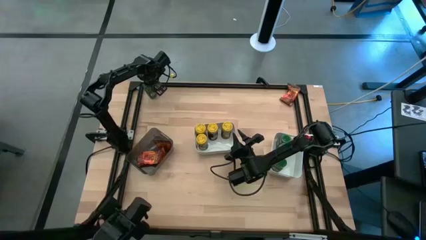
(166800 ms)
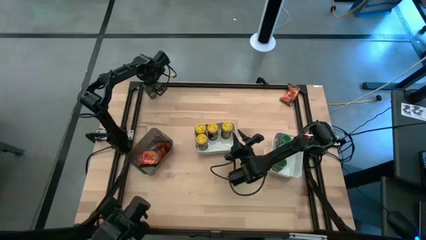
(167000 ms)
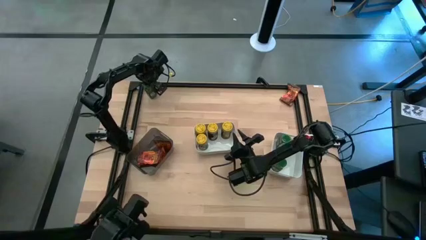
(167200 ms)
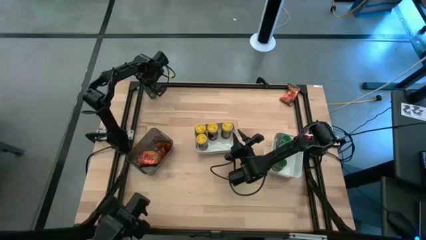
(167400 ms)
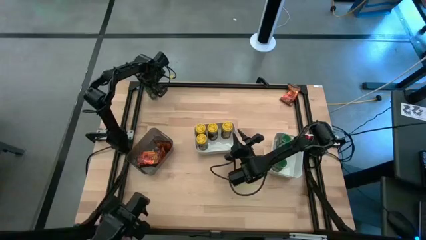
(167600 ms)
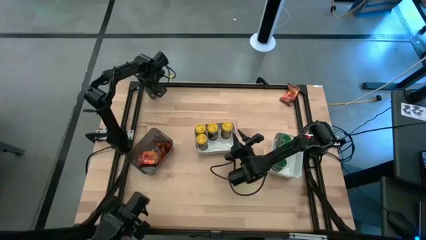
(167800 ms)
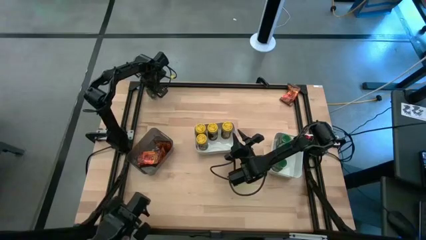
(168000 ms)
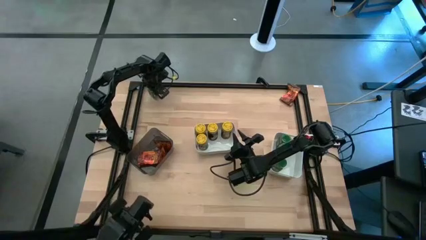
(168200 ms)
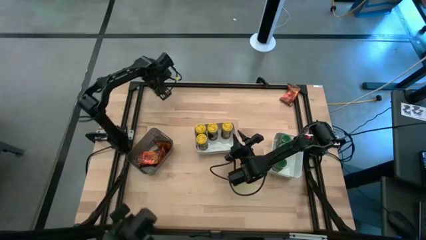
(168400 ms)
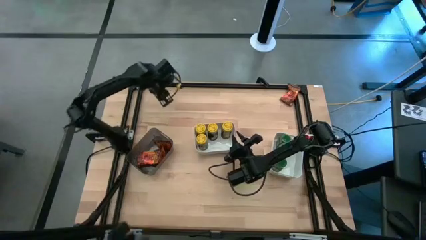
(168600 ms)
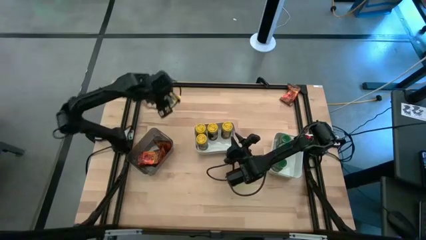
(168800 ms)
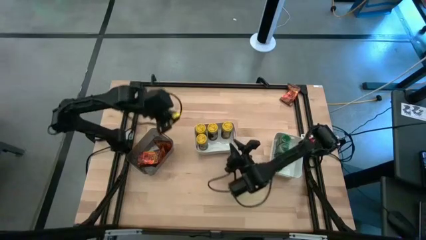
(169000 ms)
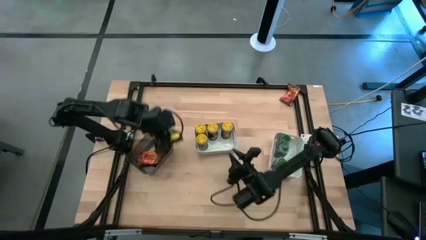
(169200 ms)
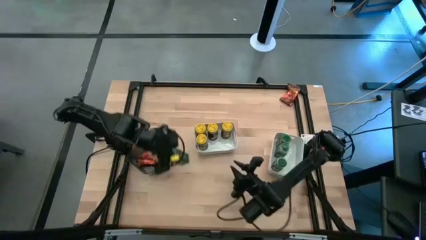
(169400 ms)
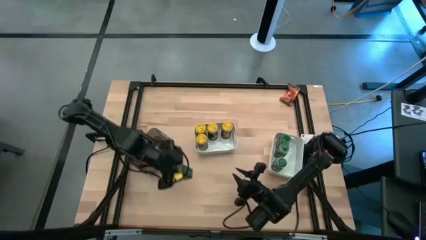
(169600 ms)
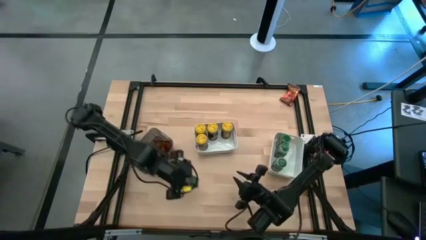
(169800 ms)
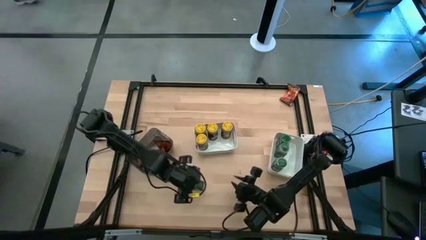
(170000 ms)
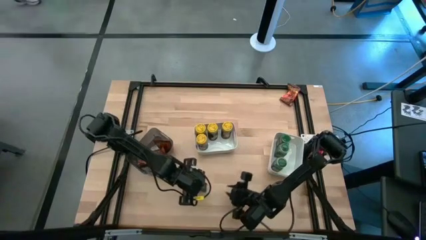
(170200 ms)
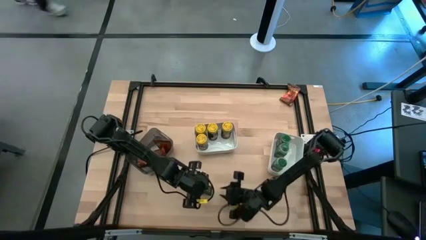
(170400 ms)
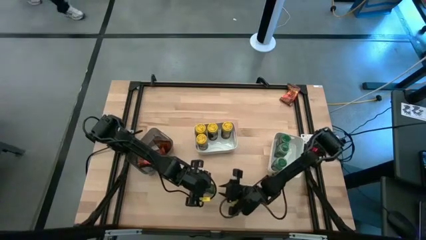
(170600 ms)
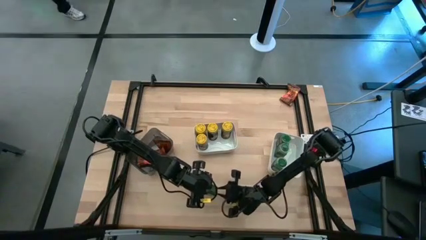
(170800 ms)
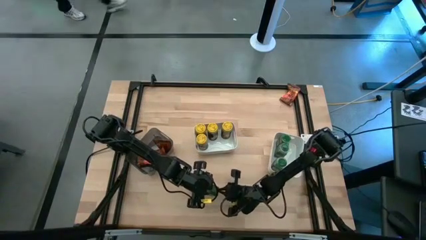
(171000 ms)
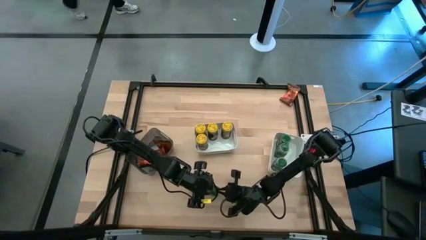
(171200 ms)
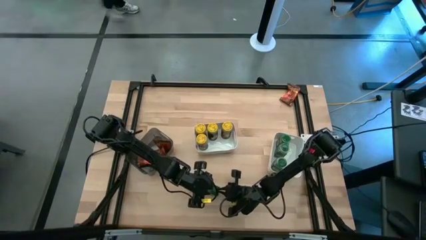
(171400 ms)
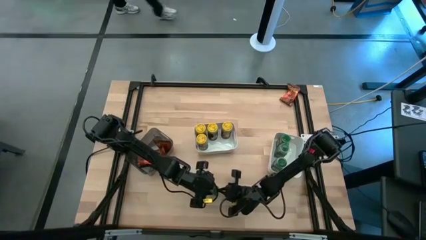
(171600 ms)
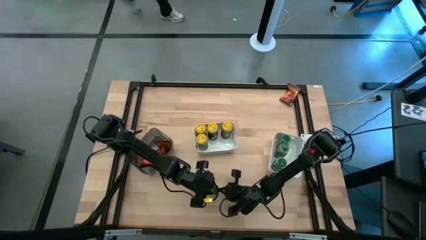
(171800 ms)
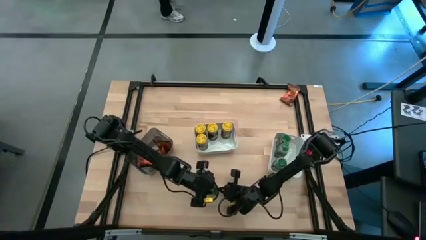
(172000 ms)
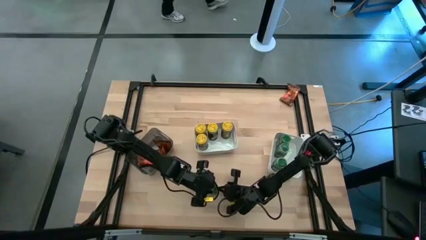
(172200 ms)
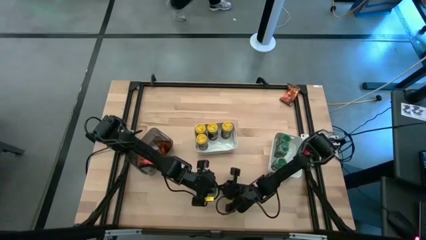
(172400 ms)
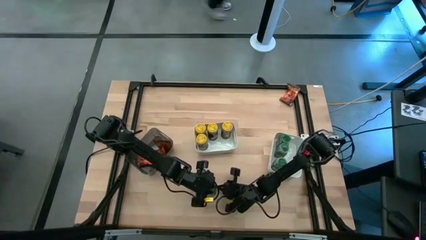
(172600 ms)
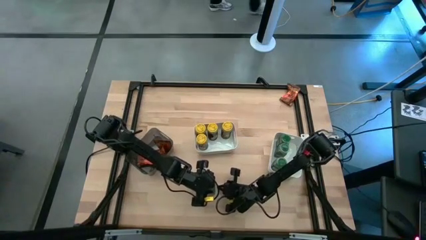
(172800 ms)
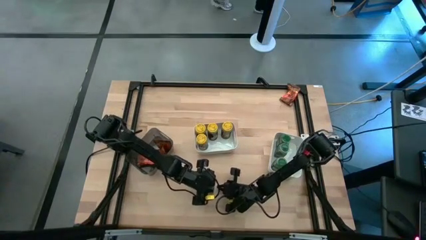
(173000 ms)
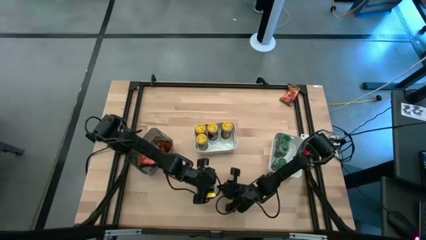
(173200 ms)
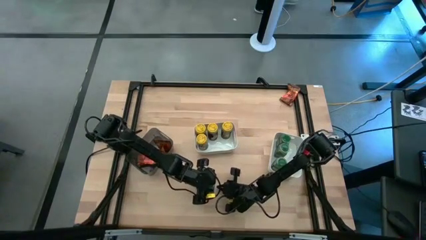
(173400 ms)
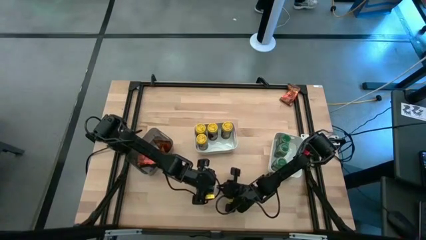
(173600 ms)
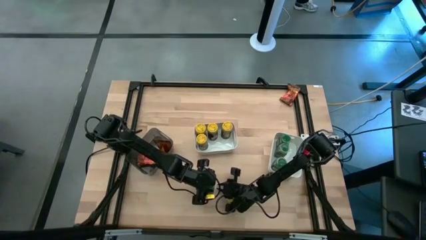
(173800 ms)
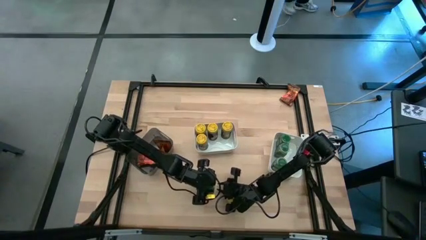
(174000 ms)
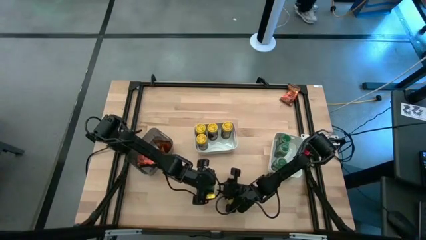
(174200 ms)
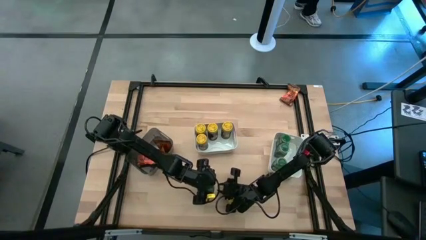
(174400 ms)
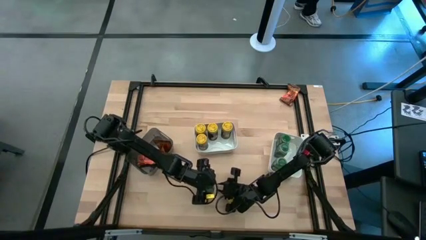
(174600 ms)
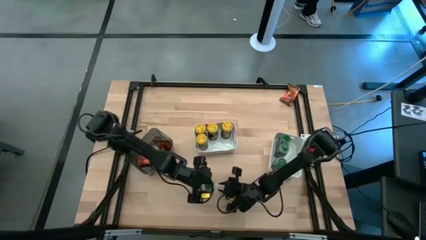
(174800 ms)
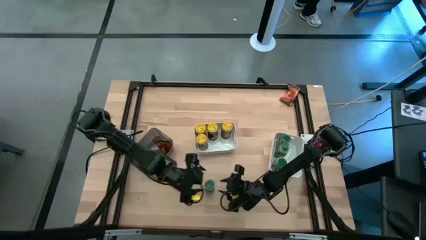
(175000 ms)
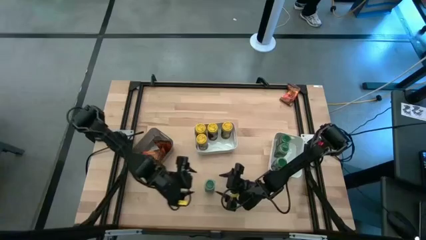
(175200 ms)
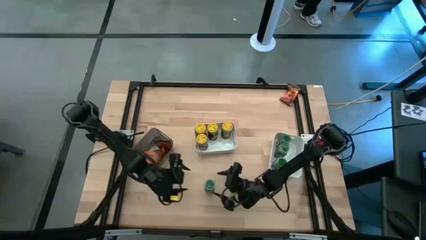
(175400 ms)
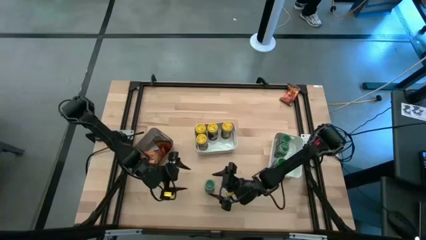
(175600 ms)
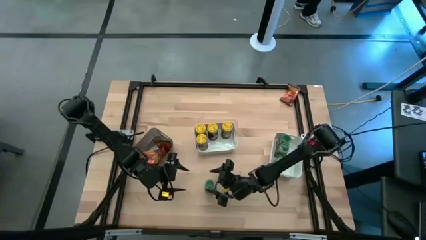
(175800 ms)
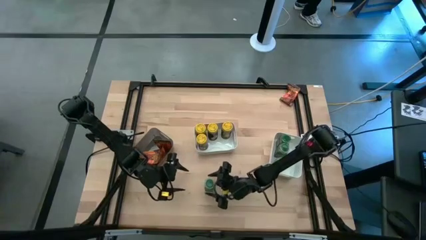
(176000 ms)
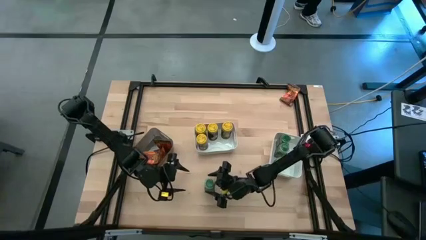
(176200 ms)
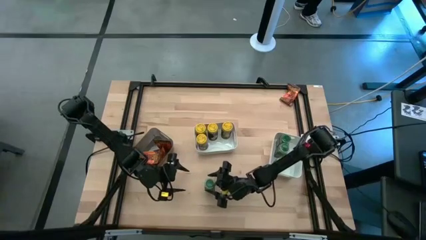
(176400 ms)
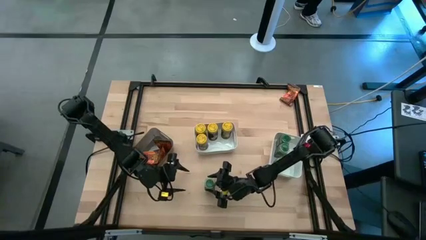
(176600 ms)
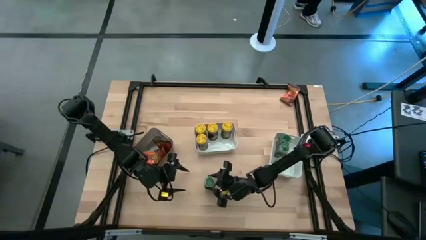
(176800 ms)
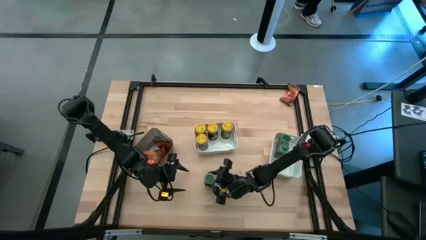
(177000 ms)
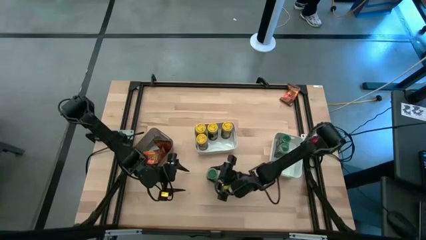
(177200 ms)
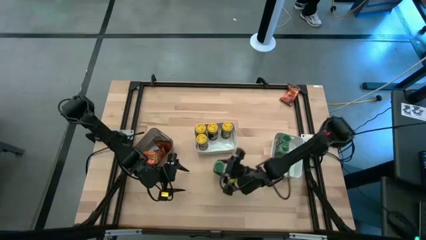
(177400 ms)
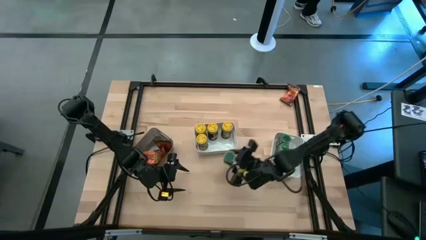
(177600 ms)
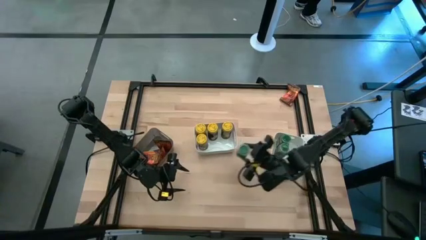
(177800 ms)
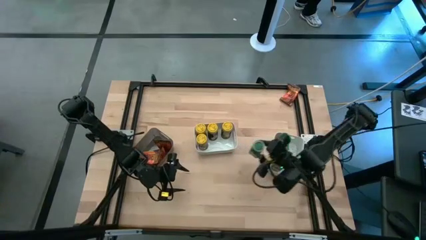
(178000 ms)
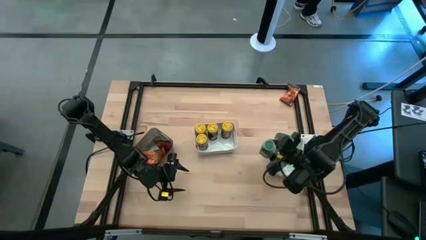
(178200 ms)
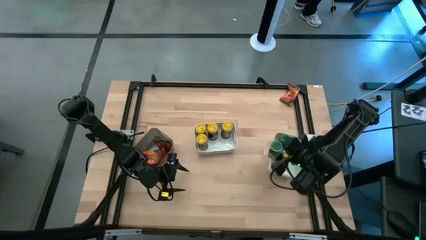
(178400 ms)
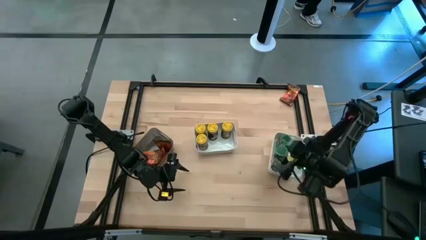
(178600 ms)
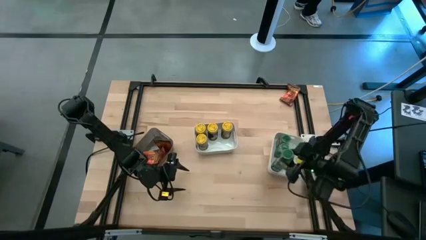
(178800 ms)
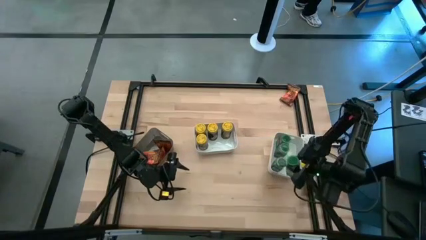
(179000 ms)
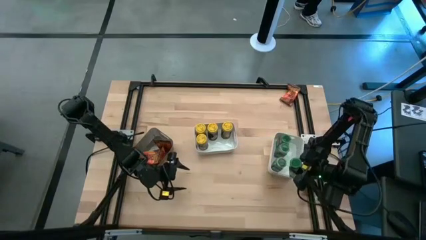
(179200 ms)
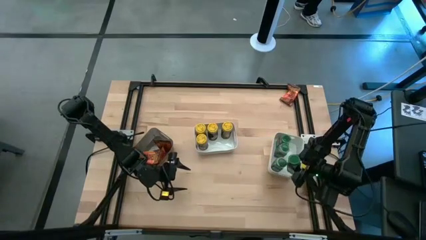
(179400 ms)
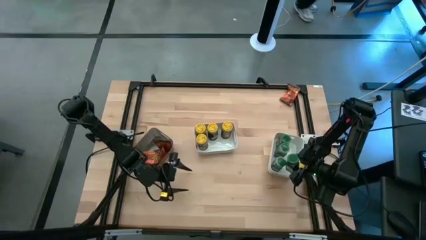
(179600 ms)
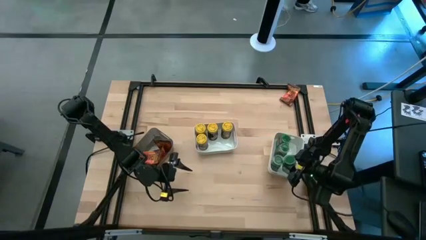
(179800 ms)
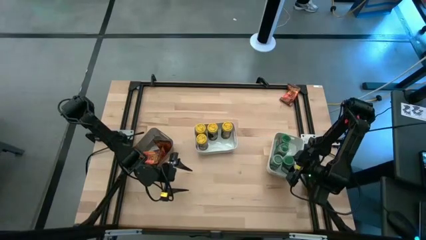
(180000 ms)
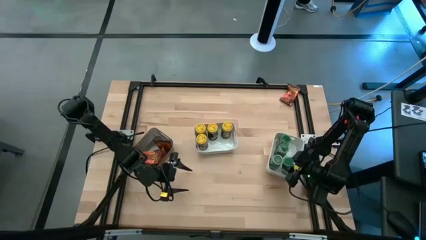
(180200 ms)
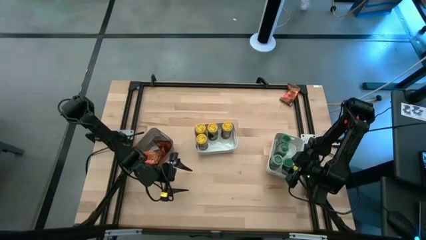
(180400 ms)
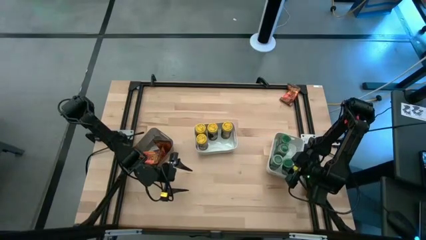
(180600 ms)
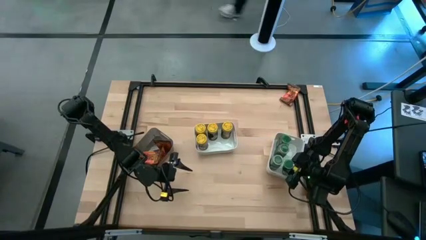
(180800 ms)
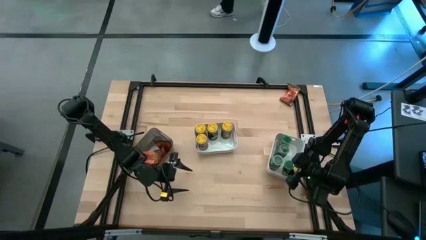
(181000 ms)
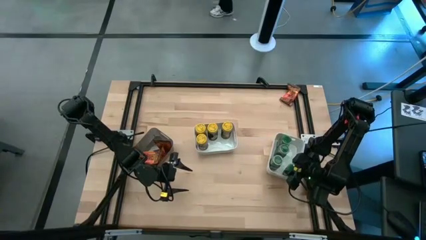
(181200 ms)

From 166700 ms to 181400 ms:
Task: Sort spices by type
Put the green seasoning bottle into the right white bin

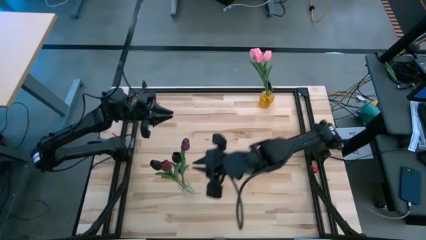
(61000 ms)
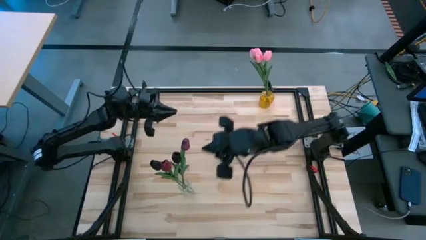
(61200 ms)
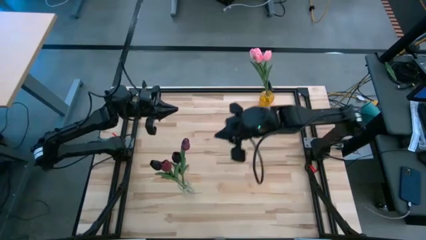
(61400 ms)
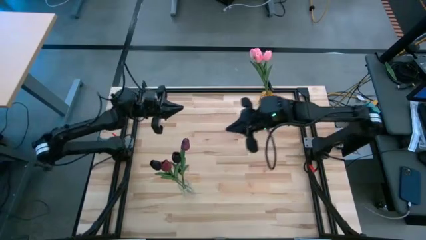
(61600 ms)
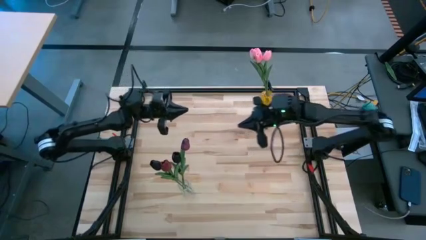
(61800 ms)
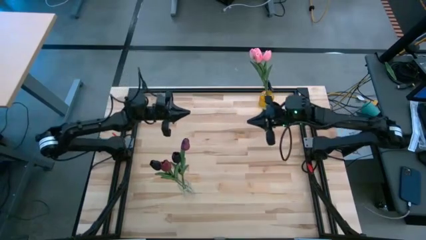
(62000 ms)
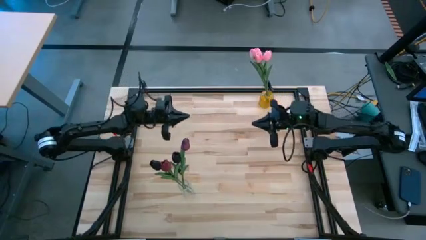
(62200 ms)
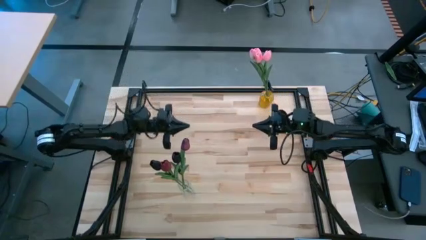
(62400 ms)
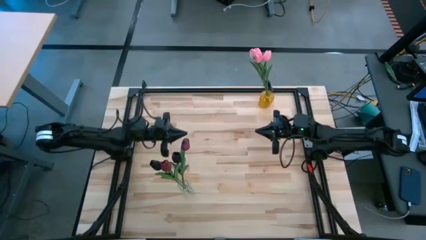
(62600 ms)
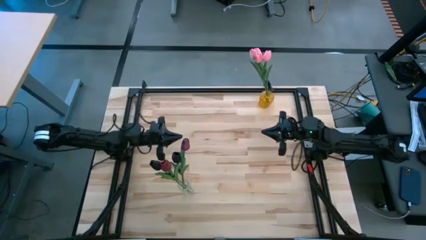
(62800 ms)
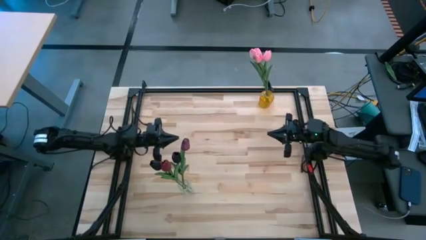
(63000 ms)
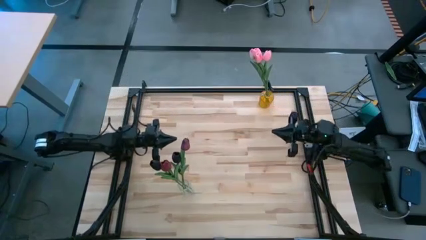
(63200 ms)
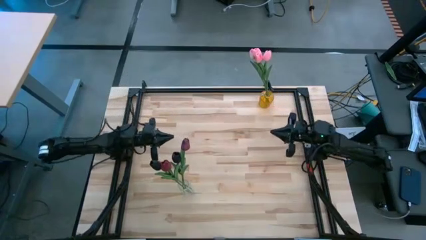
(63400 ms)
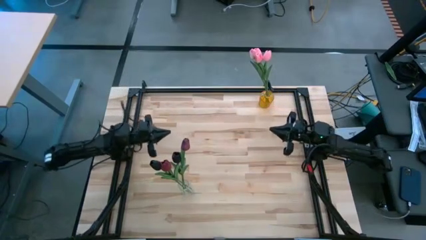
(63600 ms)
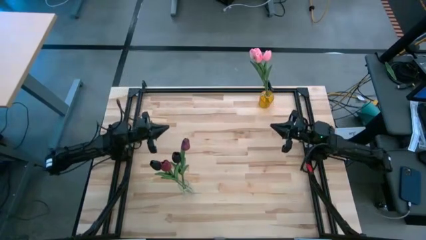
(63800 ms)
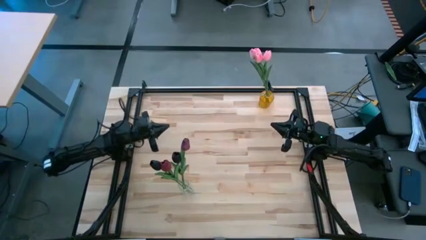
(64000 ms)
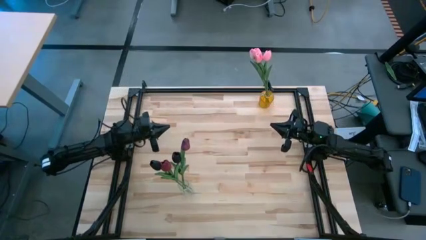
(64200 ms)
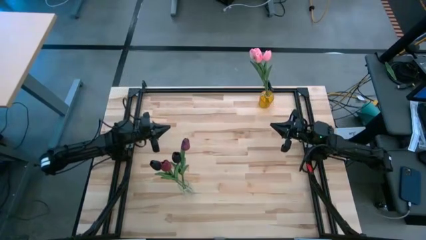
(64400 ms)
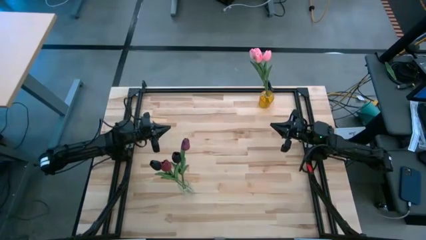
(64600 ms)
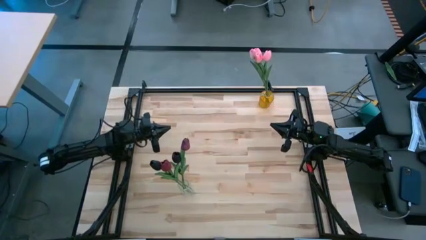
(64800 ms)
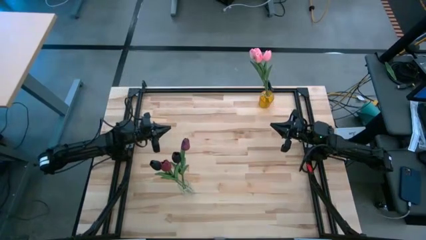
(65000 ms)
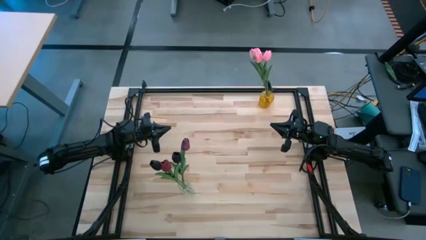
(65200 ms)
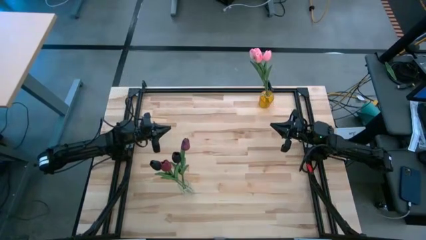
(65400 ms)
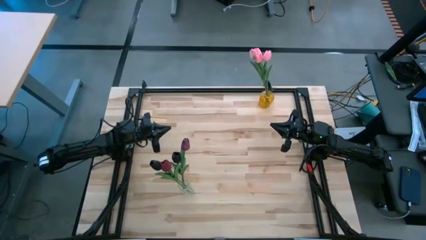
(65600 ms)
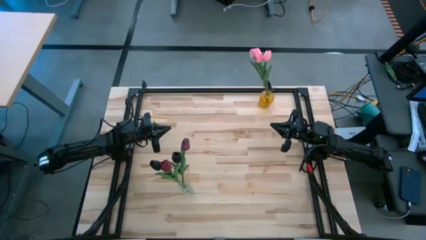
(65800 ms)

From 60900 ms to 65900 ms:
Task: Sort flowers into vase by color
Return To Home Position
